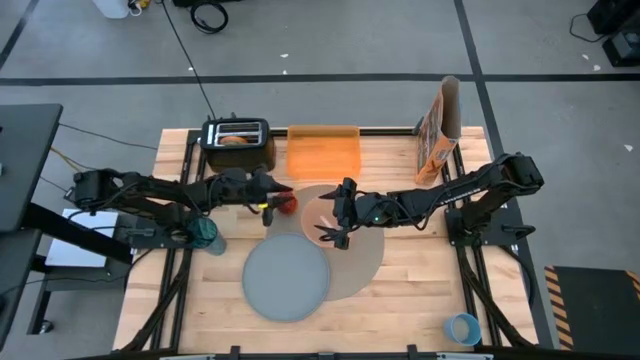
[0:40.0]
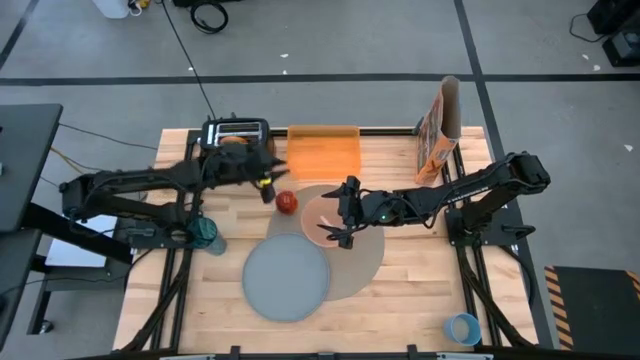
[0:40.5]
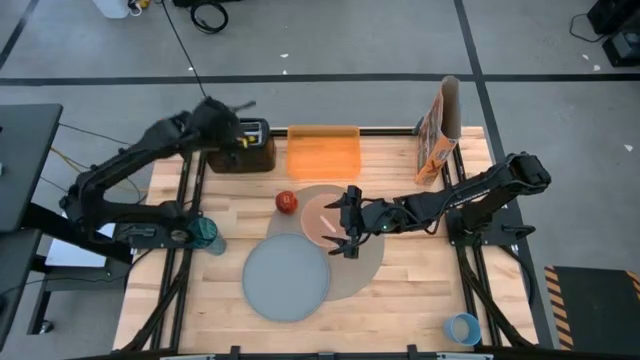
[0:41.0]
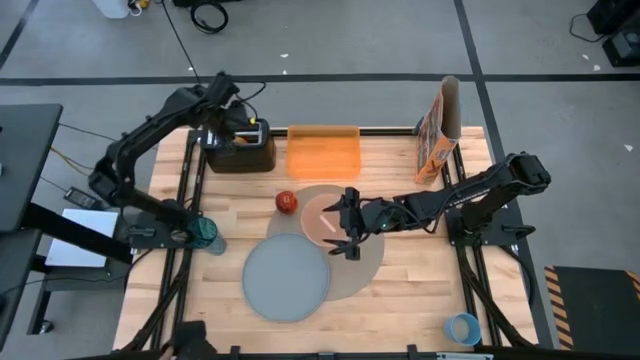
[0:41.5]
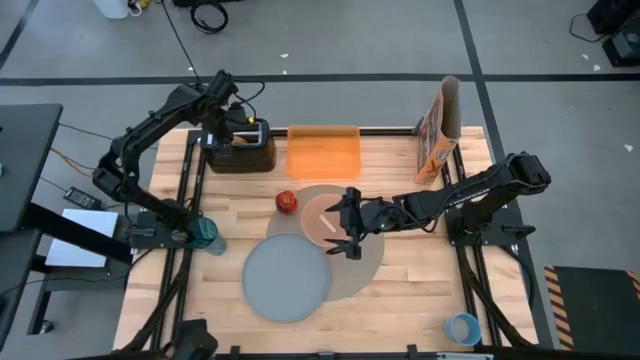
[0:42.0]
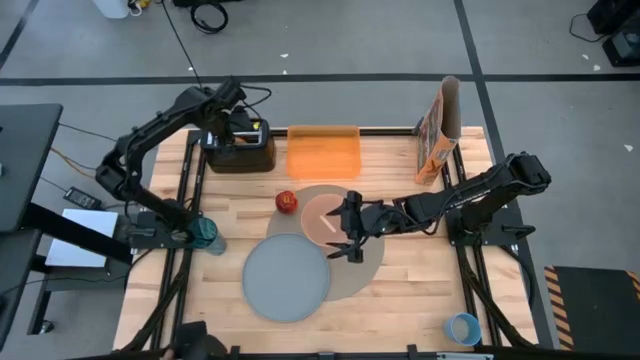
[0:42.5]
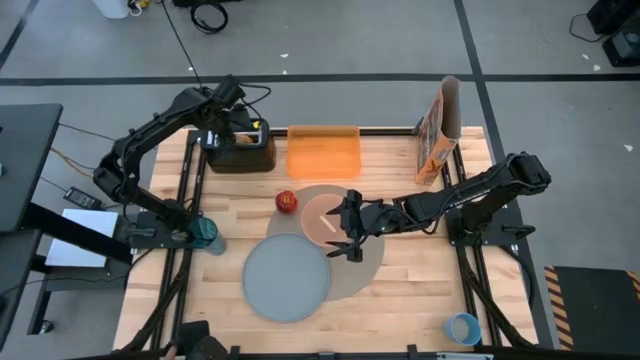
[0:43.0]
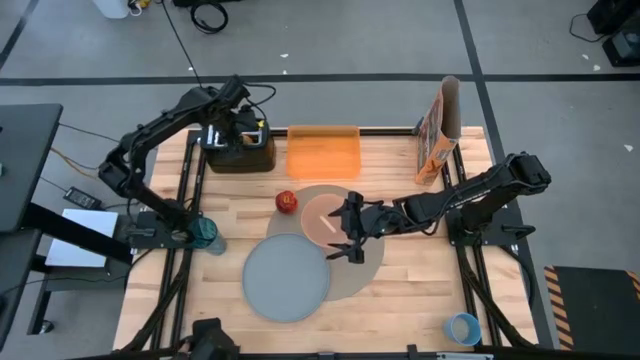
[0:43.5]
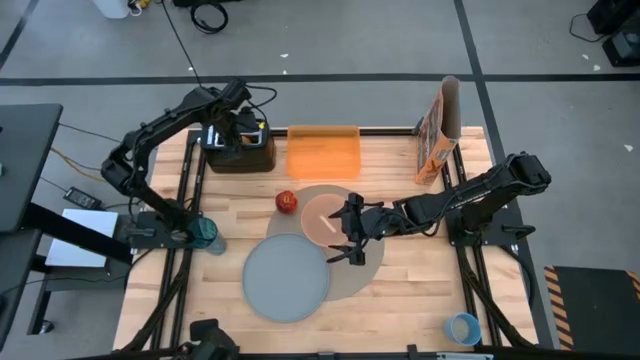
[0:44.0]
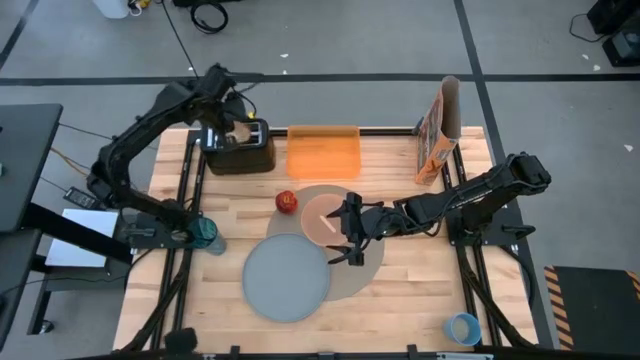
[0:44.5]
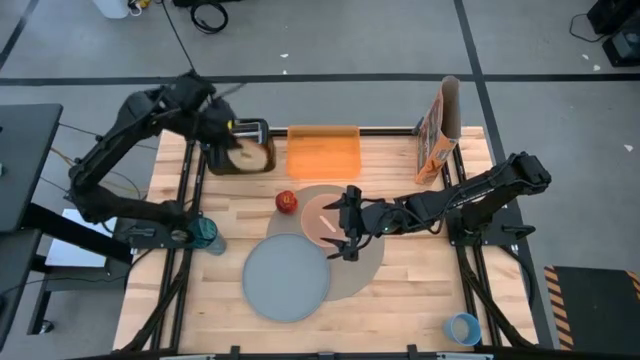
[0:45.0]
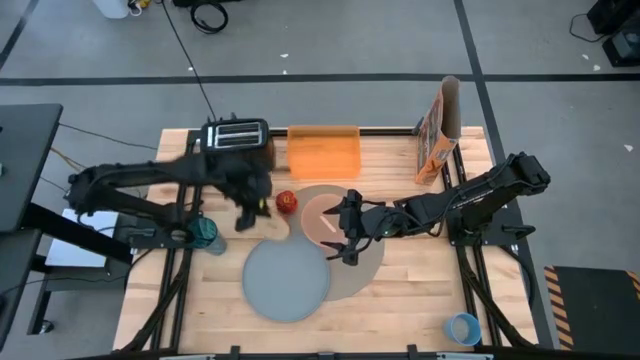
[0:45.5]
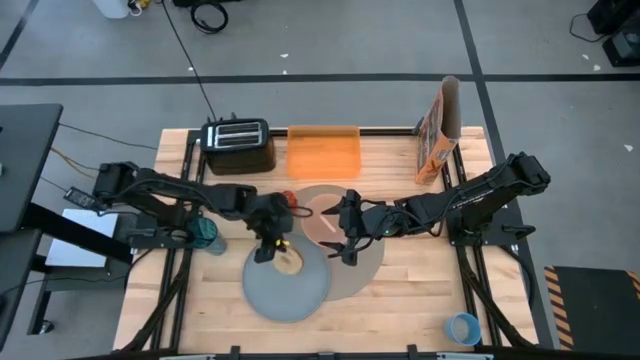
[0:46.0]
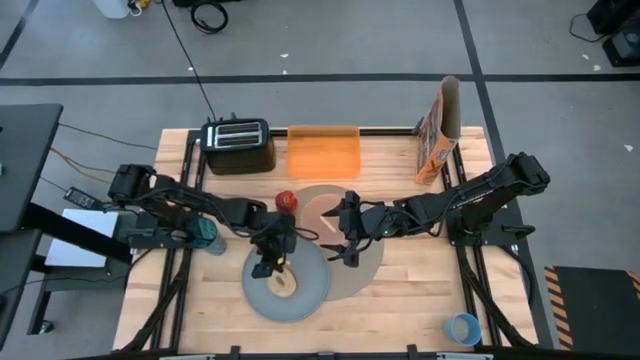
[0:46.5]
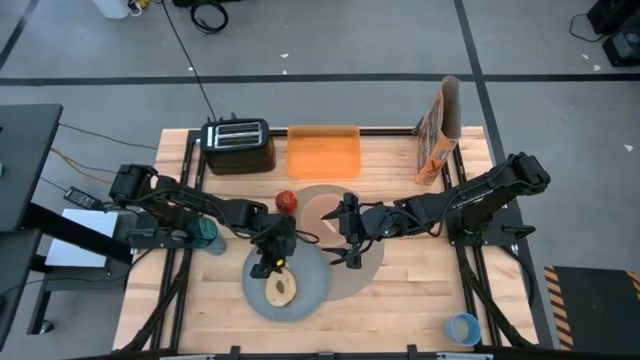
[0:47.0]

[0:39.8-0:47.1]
Task: Arrange a breakfast setting
Put the bagel on the blue plate

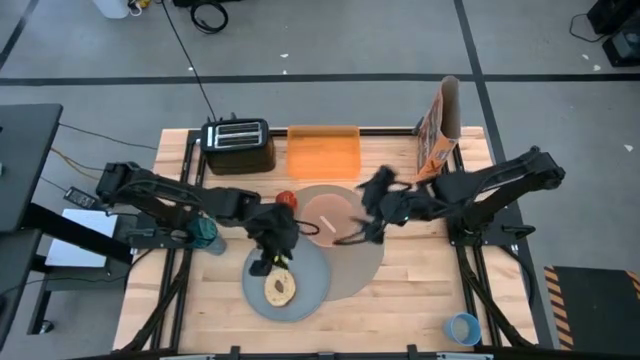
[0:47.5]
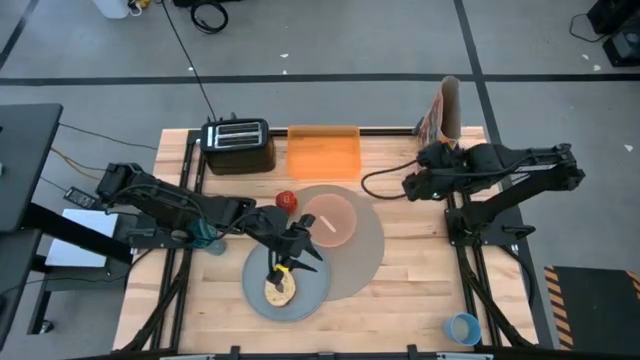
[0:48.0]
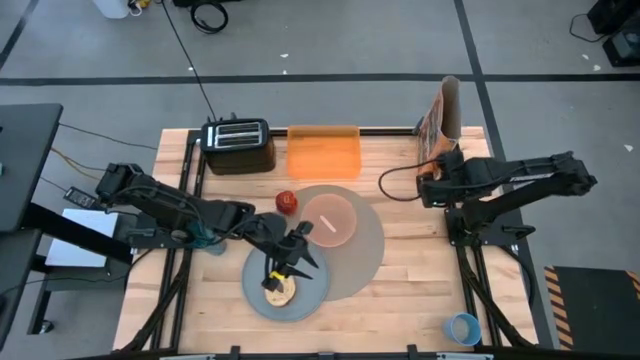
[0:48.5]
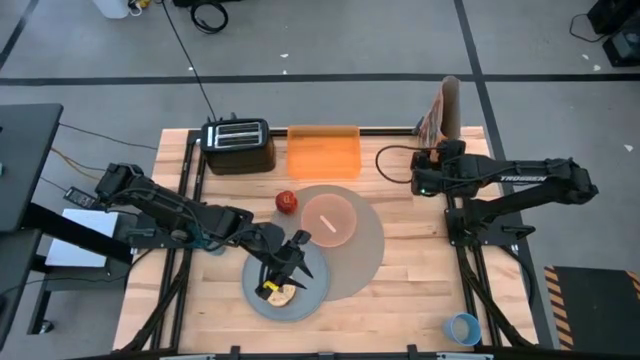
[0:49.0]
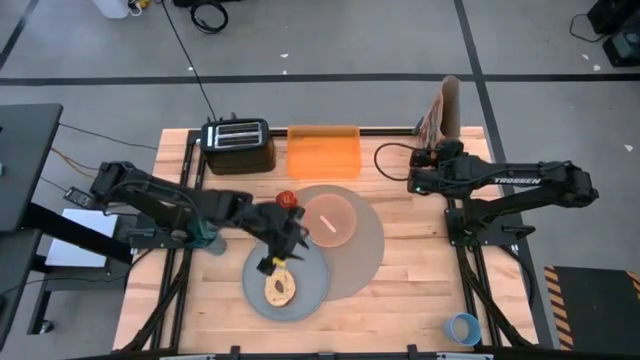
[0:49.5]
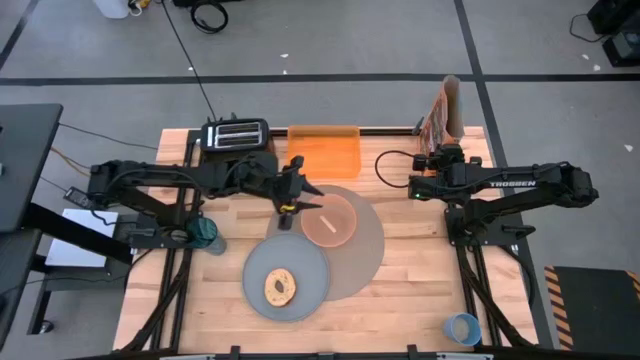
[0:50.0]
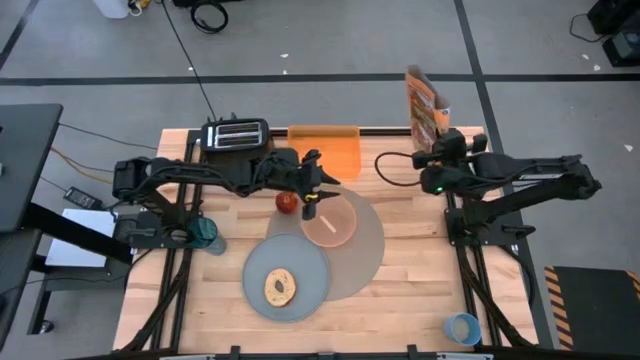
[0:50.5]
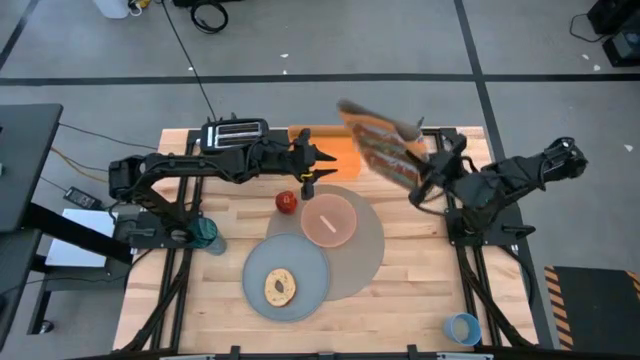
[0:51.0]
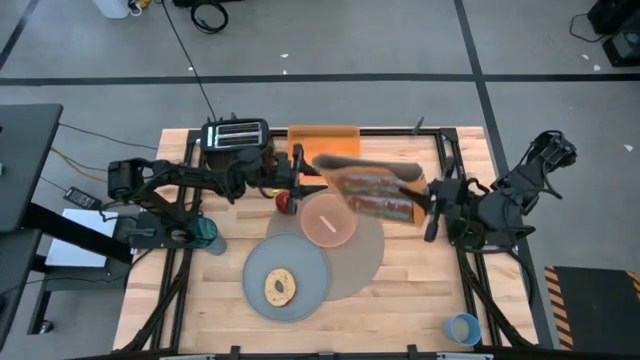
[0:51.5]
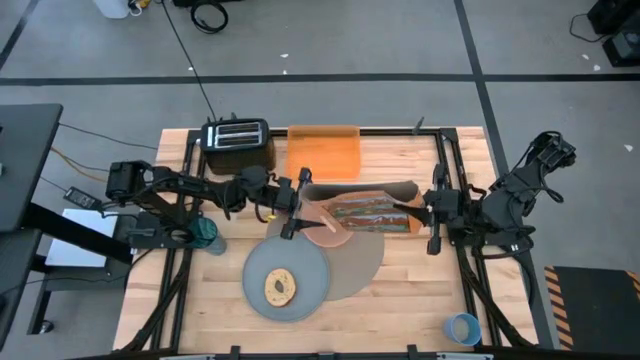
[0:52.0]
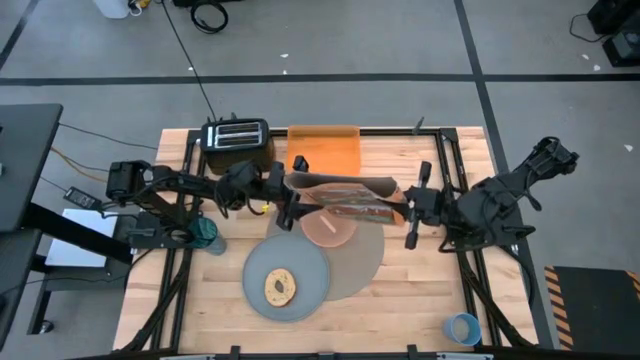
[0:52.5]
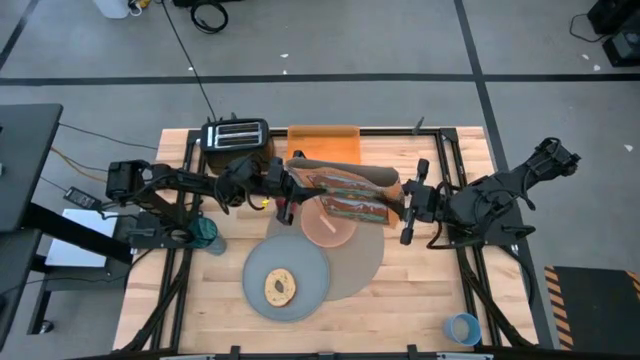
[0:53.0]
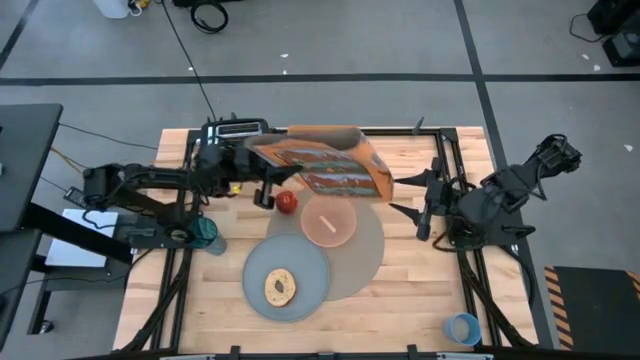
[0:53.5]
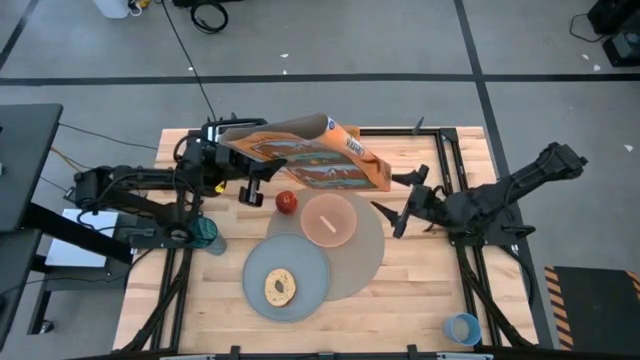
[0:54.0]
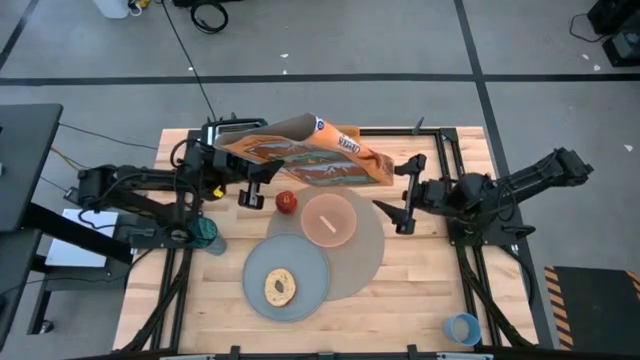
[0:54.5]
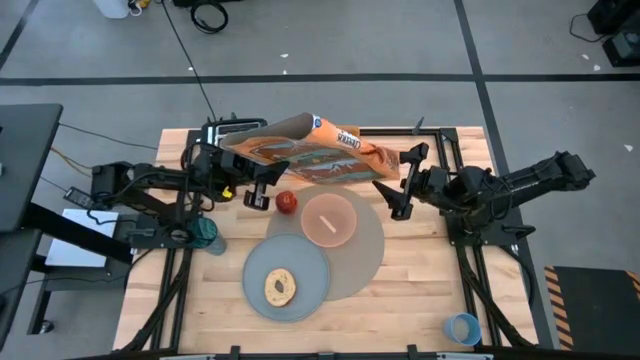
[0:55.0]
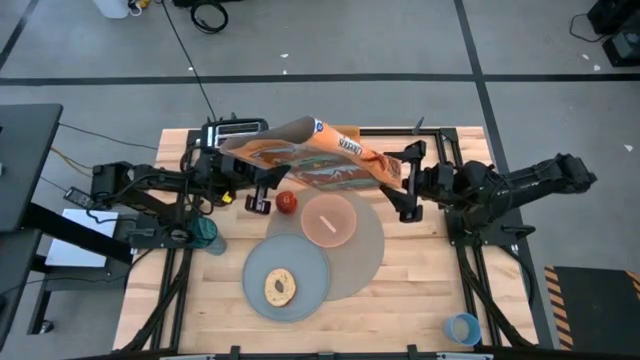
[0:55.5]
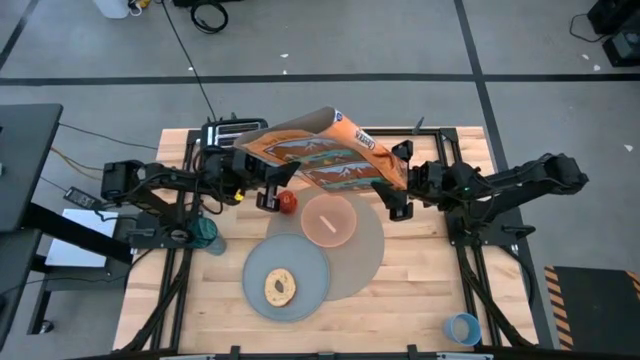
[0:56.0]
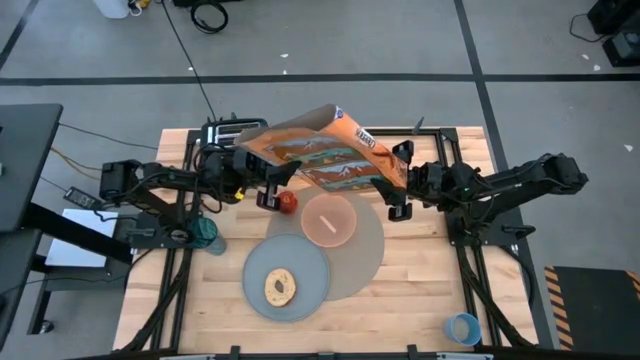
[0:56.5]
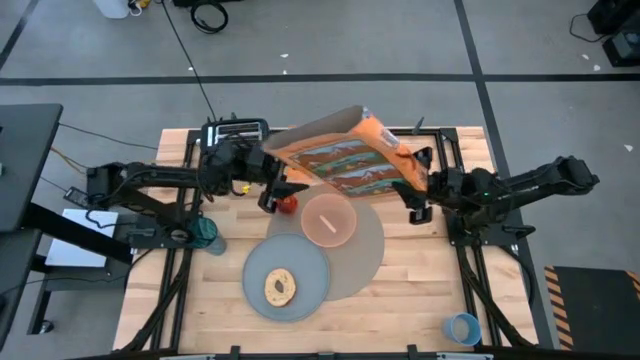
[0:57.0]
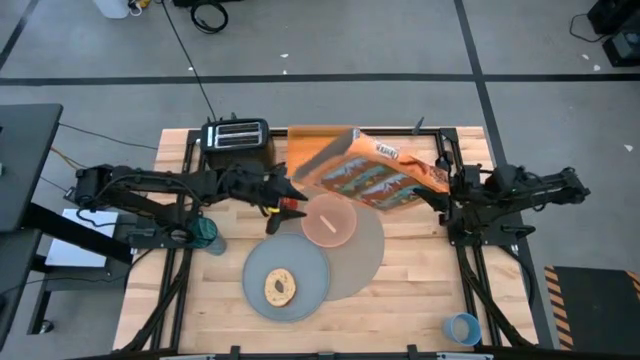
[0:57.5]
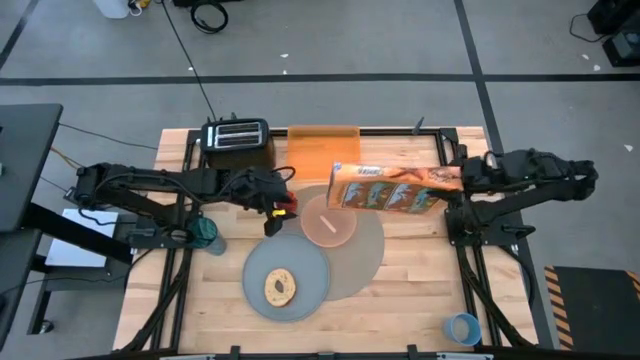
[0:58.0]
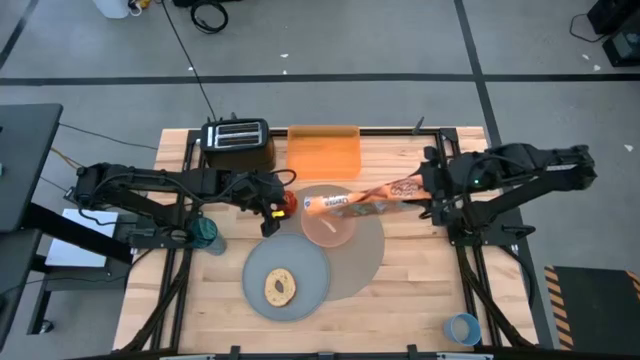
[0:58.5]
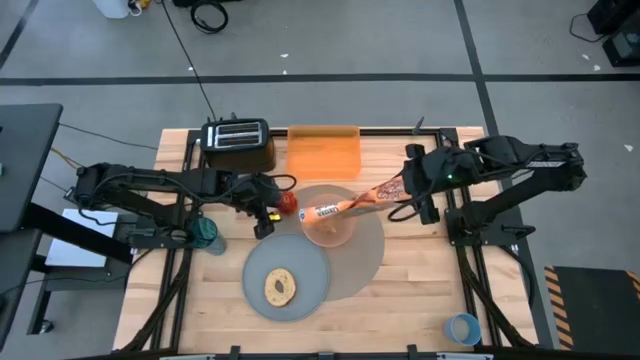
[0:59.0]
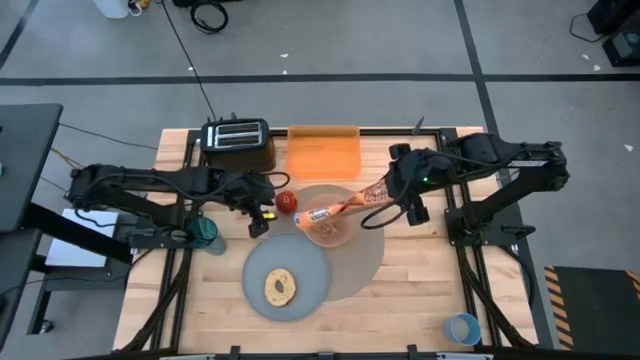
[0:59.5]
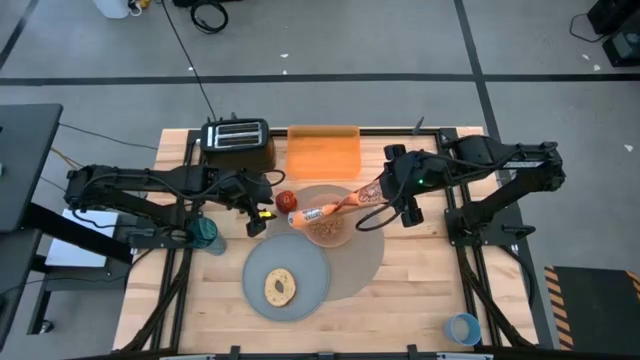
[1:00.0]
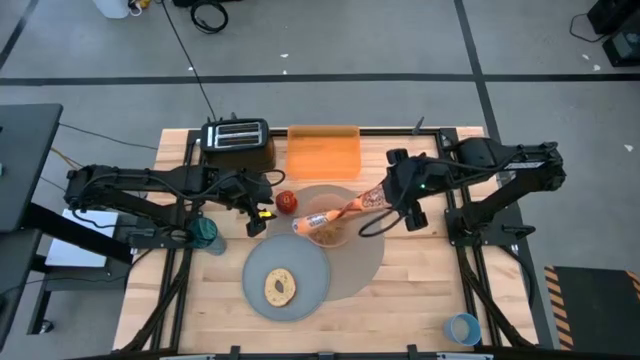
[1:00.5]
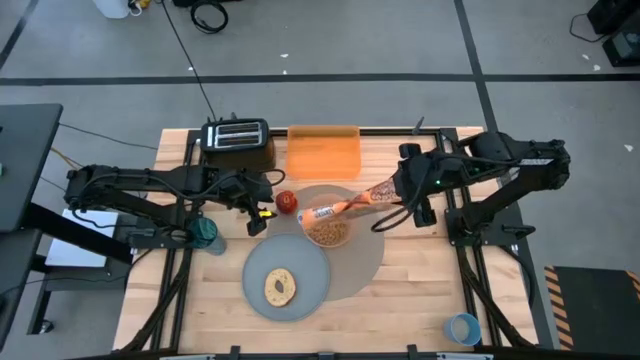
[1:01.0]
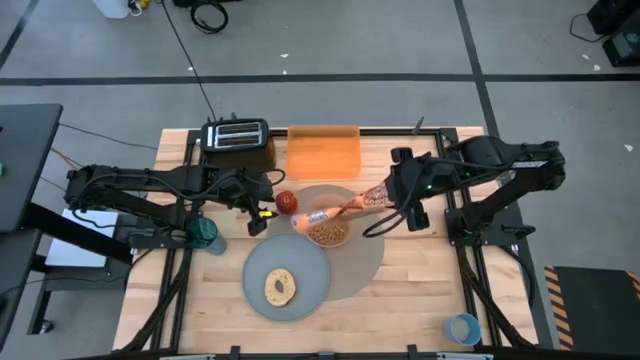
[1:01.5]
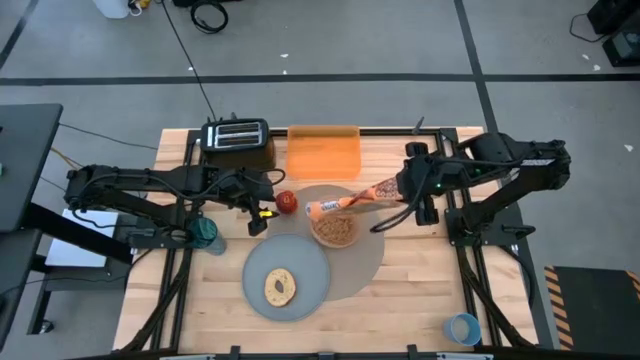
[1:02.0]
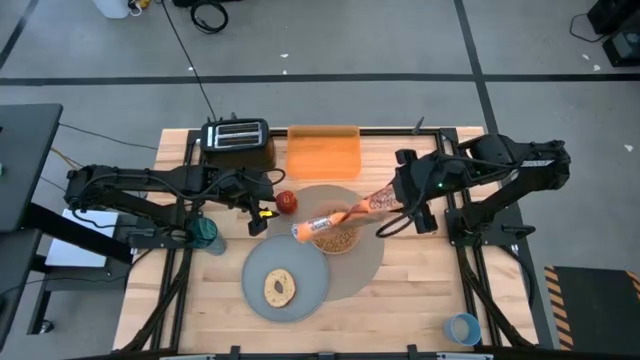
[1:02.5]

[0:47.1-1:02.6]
Pour the cereal from the cereal box into the pink bowl
